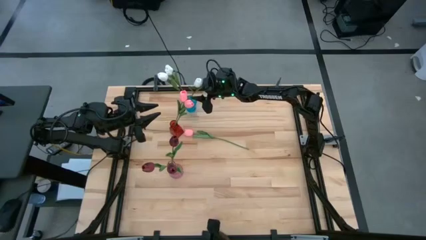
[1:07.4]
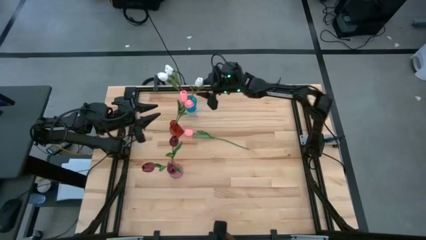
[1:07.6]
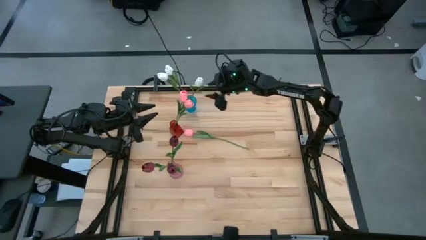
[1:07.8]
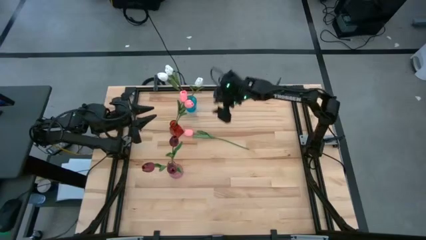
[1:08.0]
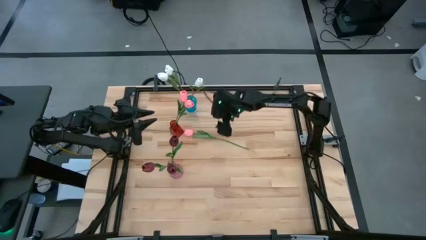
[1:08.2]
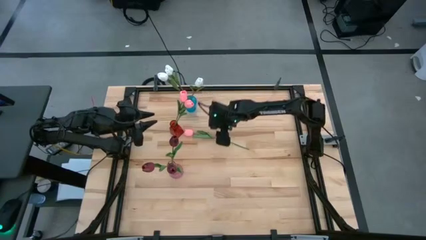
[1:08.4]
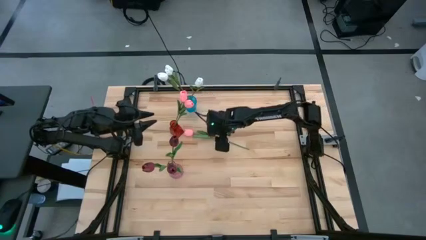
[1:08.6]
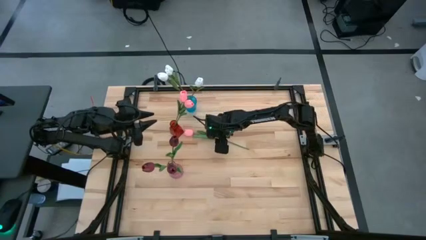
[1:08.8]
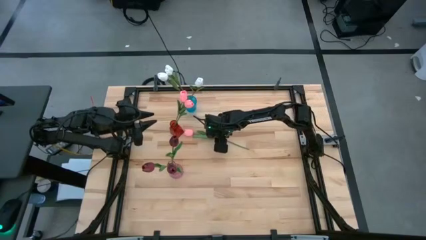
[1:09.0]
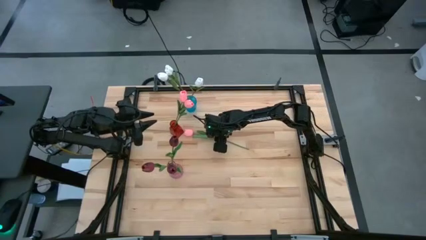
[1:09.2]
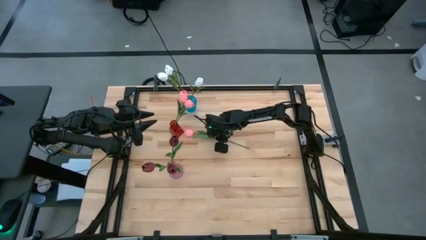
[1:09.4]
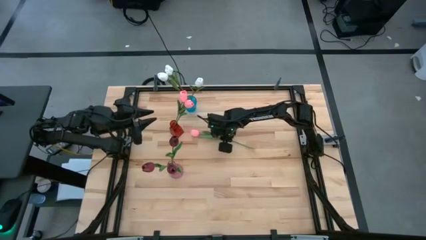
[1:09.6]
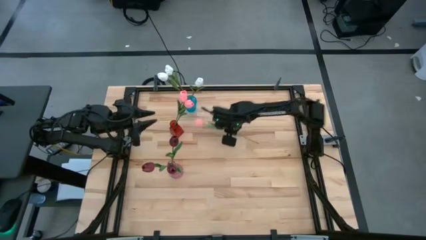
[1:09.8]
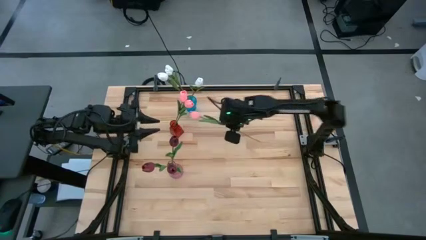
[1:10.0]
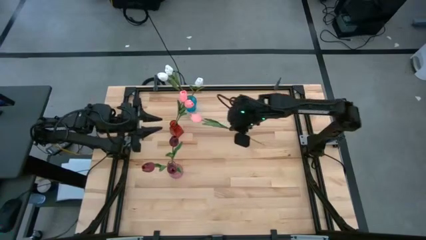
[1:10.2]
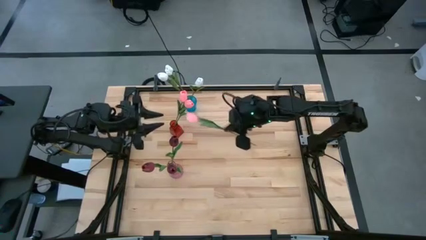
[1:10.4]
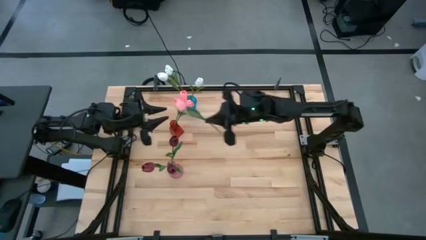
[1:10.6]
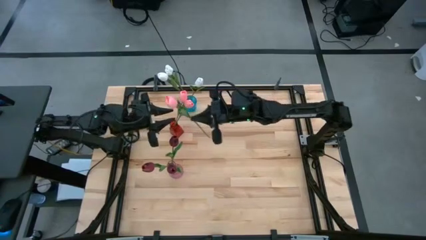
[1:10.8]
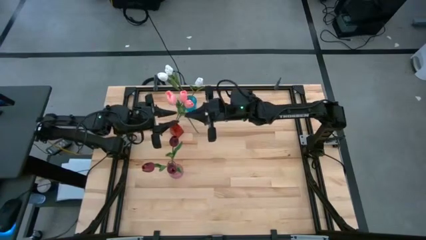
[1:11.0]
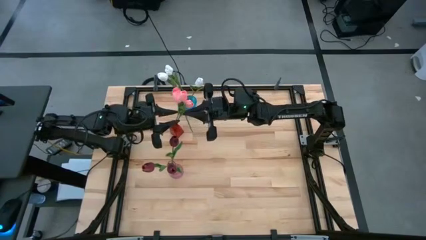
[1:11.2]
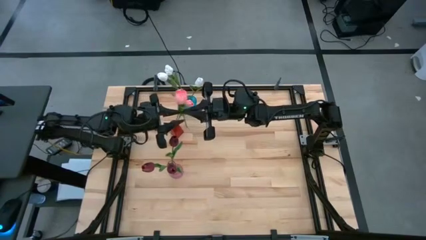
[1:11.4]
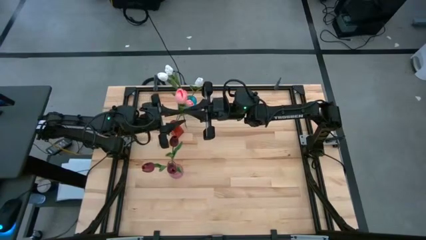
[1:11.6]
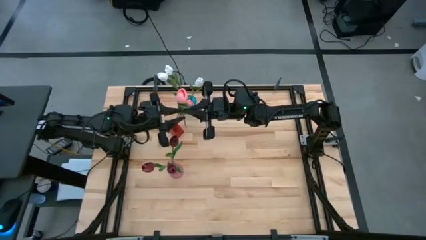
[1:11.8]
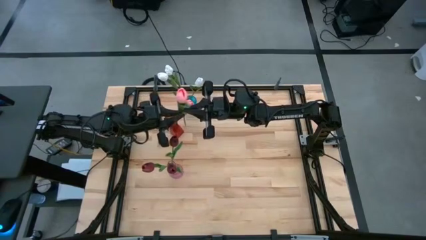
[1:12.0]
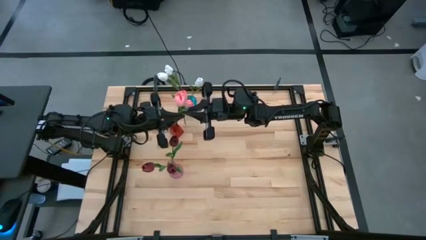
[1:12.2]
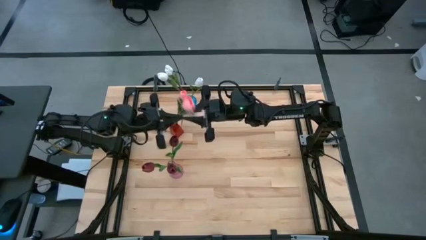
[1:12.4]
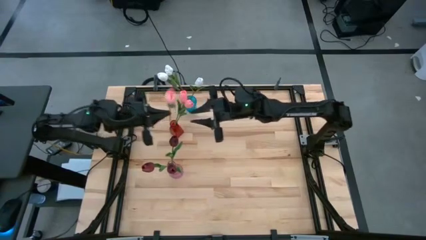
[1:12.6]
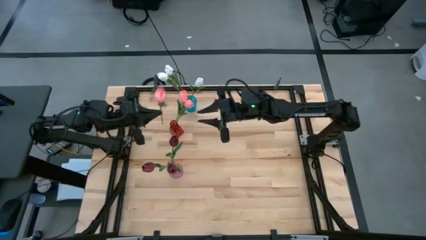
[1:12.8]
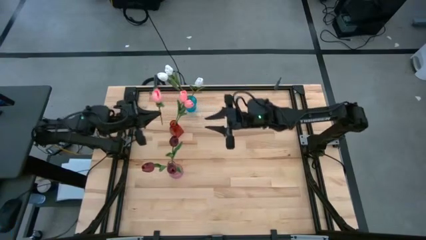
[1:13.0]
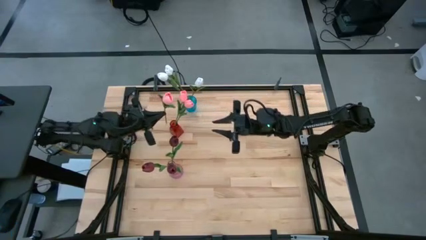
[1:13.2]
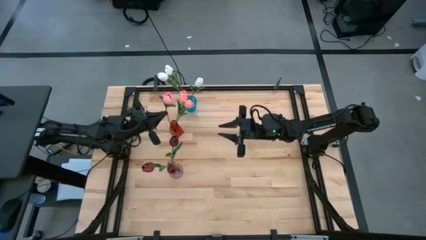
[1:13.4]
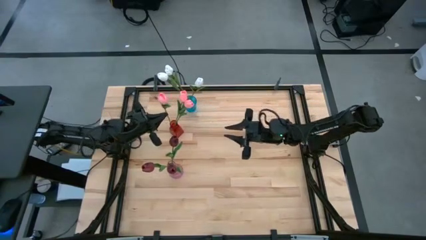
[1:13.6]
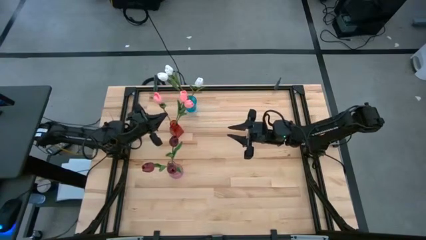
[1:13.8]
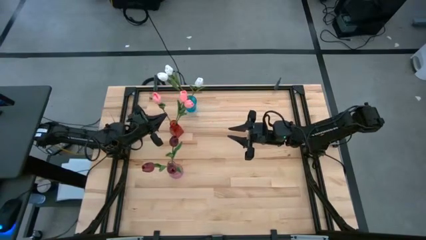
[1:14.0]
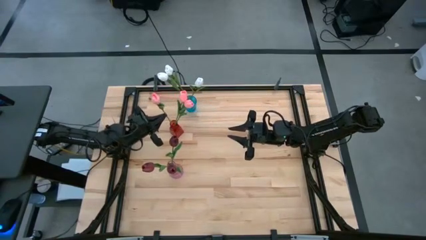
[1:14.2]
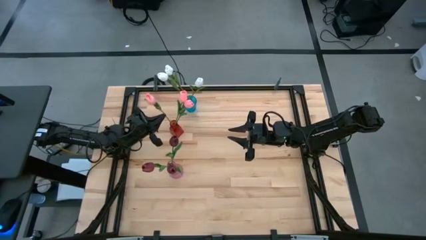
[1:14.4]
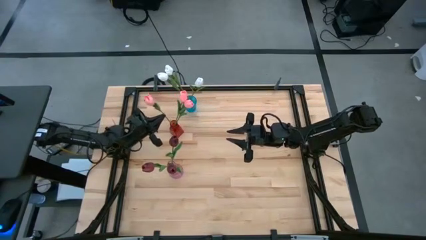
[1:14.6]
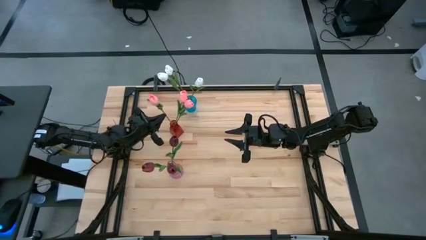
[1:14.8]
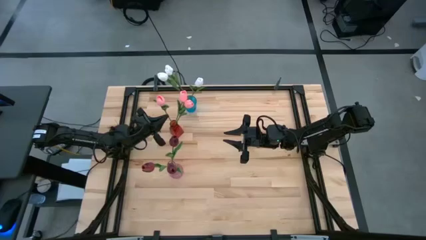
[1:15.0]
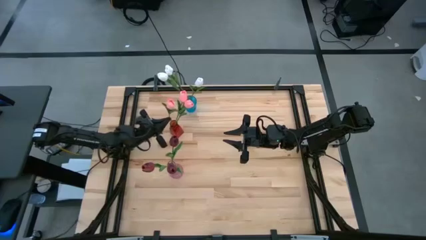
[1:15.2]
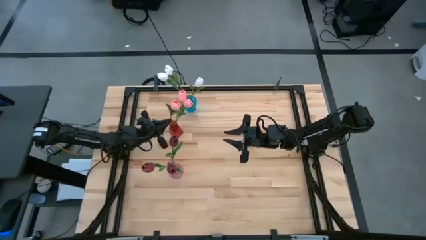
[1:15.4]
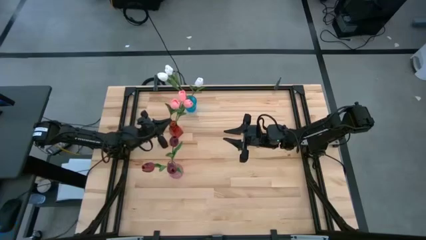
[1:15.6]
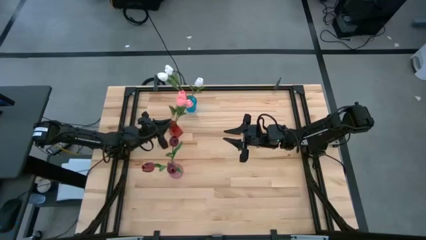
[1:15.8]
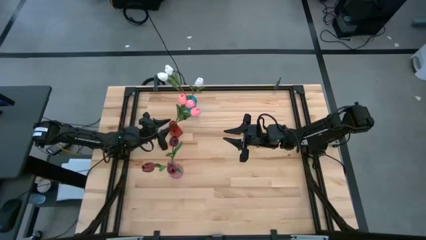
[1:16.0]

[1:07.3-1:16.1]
Task: Sort flowers into vase by color
Put the pink tulip into the red vase

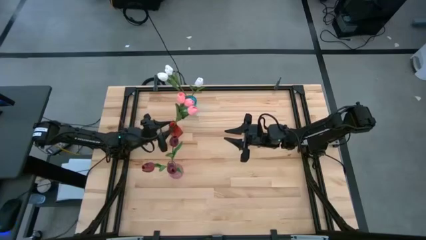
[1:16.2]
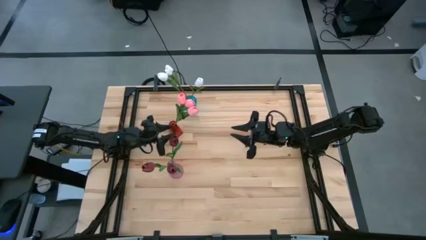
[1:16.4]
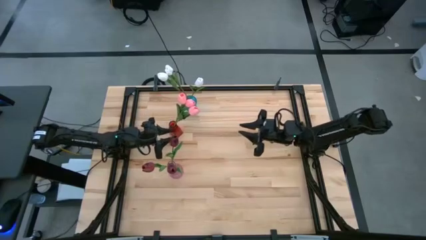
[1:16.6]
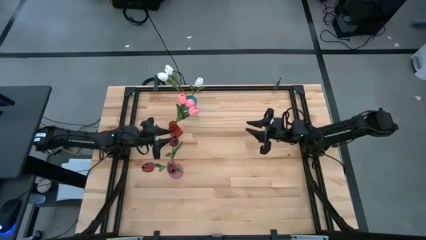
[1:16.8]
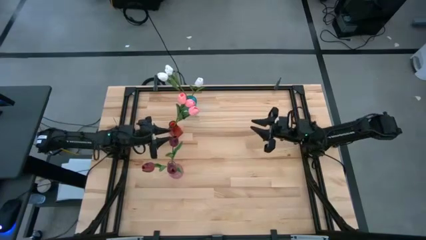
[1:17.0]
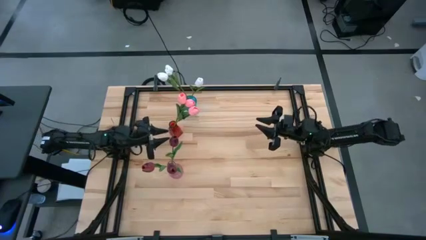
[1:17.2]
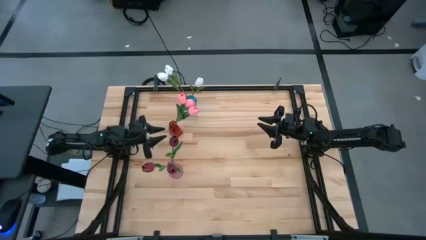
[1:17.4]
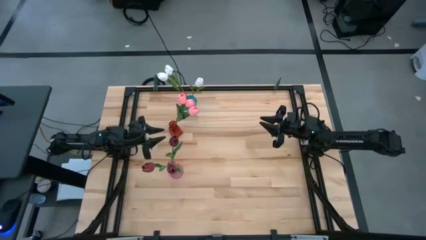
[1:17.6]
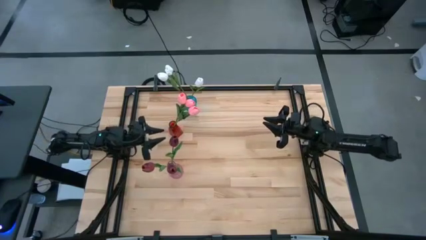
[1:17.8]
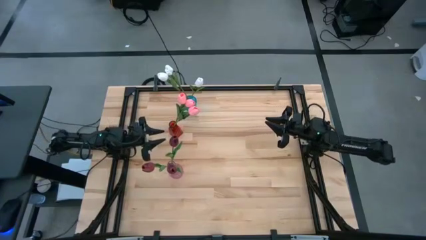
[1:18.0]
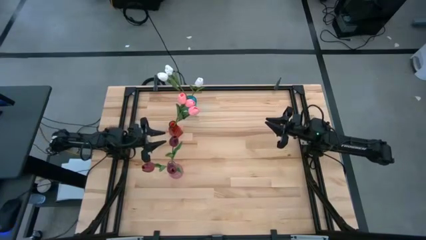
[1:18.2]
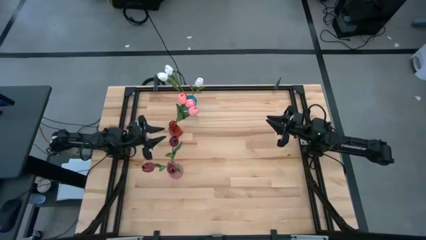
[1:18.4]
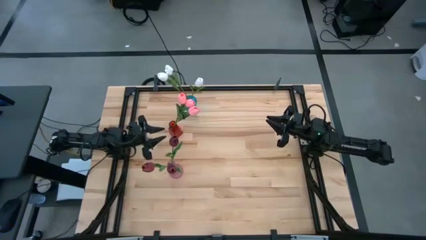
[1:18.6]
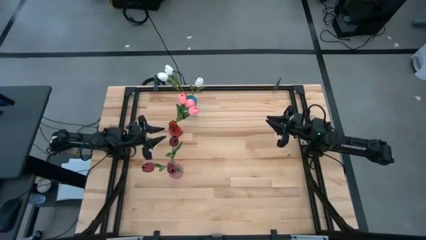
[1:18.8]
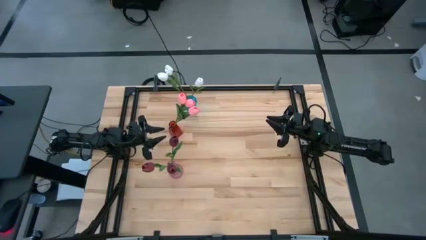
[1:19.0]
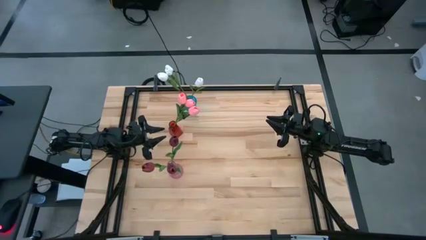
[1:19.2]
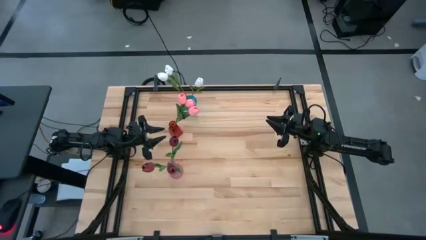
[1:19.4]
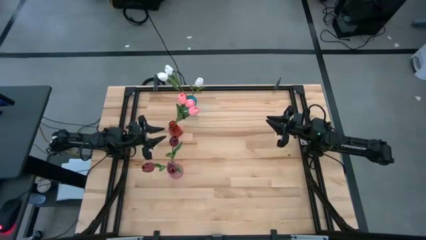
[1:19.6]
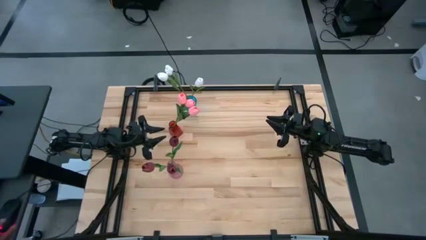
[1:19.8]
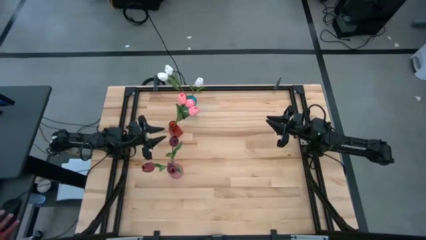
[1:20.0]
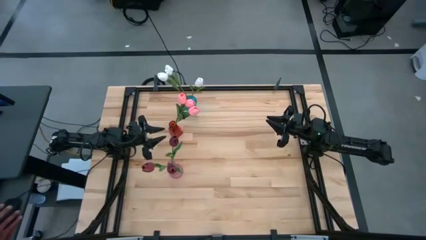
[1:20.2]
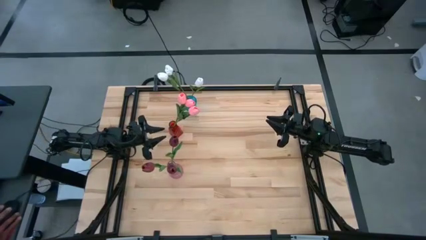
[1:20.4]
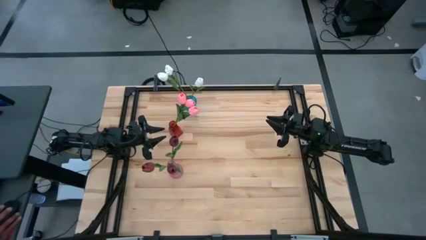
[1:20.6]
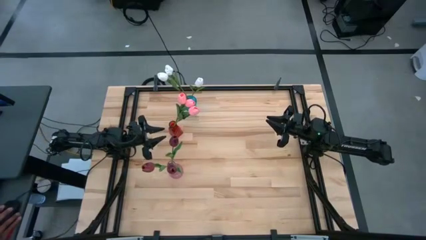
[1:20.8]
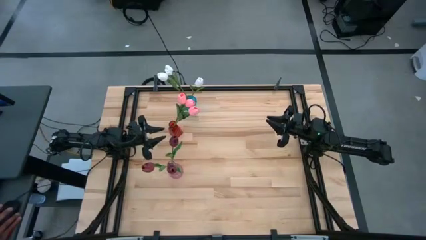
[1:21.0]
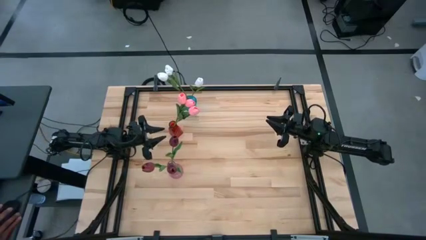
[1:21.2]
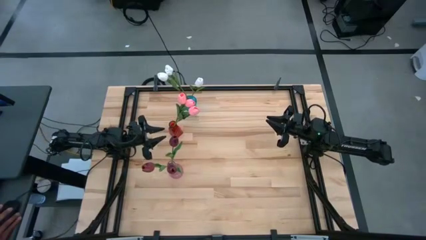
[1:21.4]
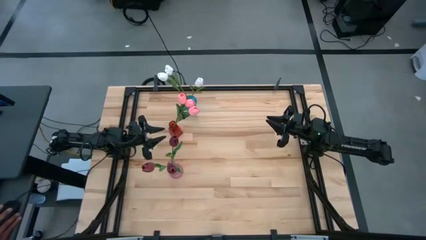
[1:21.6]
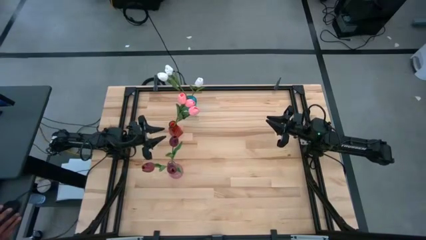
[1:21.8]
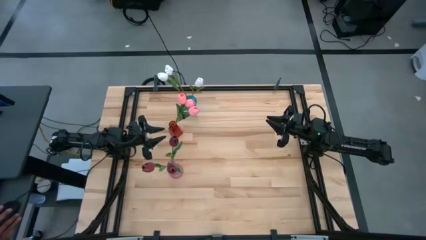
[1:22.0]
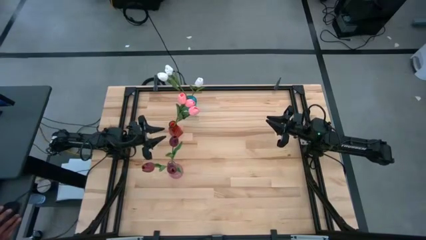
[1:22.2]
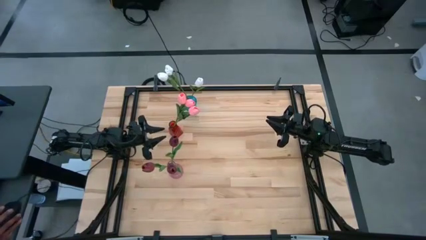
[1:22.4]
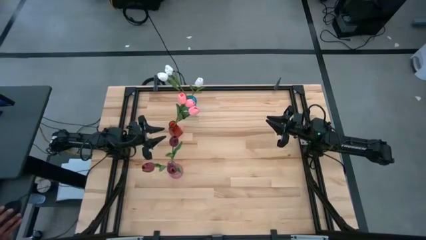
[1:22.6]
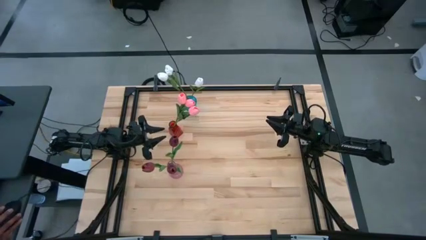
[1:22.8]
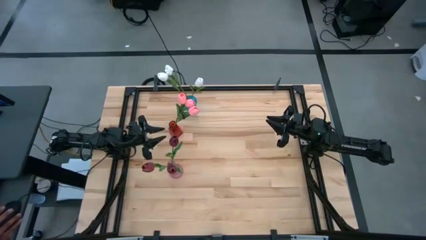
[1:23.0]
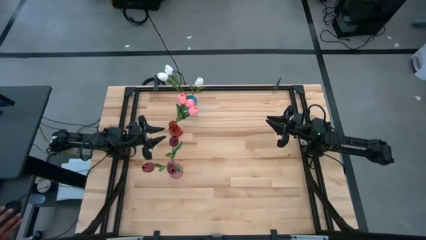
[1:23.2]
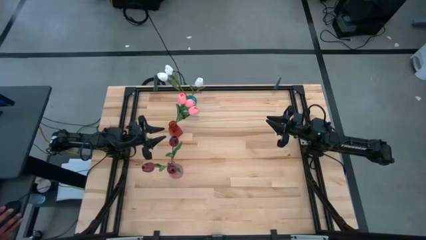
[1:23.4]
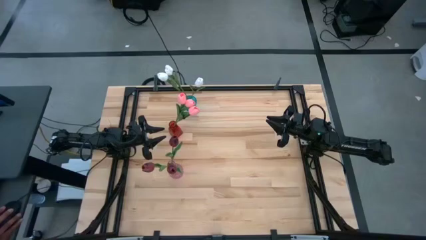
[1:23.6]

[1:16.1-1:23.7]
Return to Home Position
